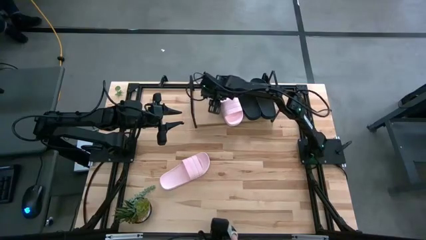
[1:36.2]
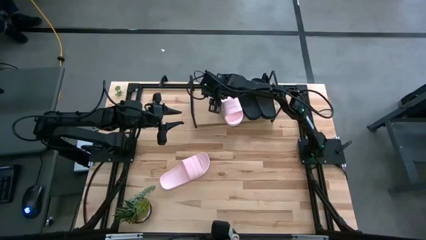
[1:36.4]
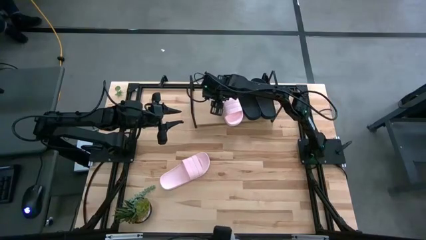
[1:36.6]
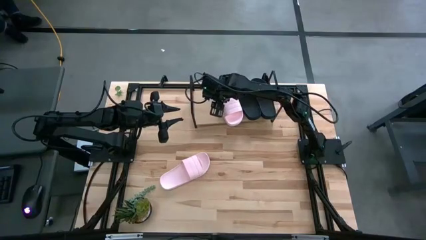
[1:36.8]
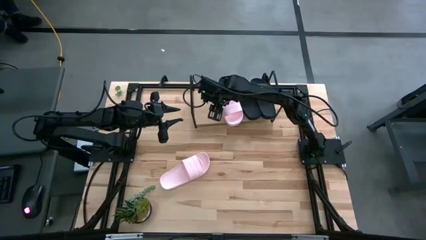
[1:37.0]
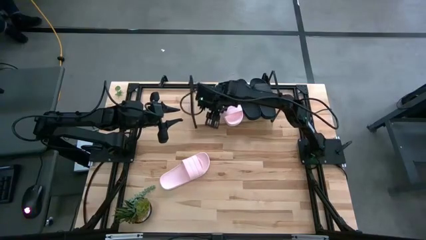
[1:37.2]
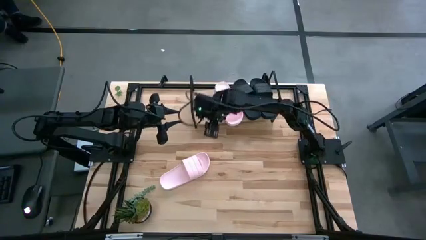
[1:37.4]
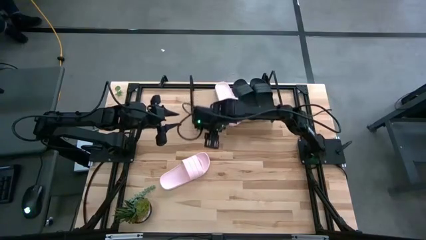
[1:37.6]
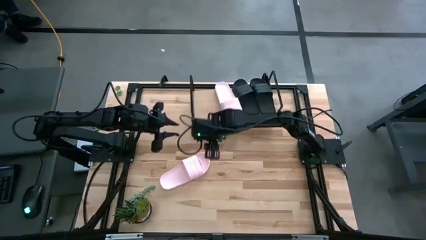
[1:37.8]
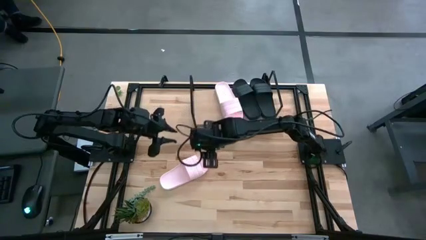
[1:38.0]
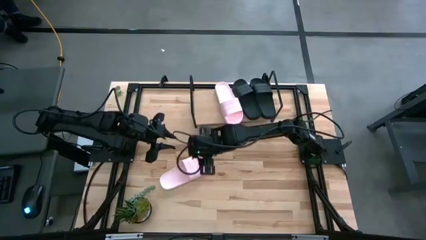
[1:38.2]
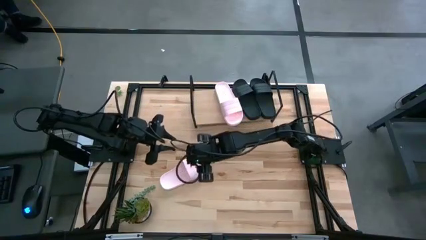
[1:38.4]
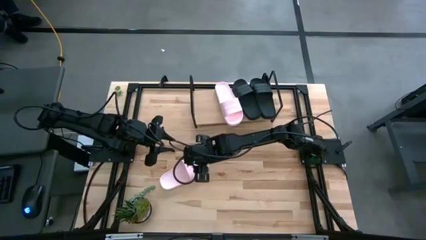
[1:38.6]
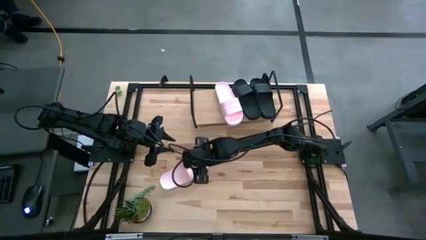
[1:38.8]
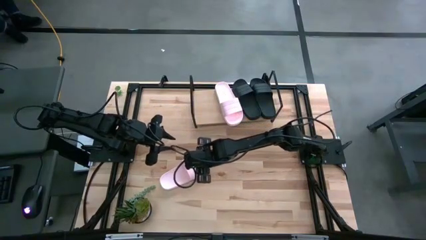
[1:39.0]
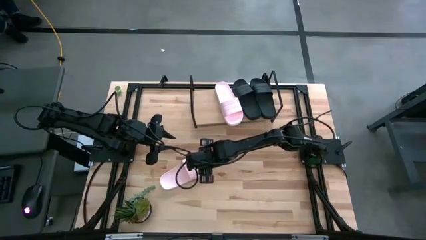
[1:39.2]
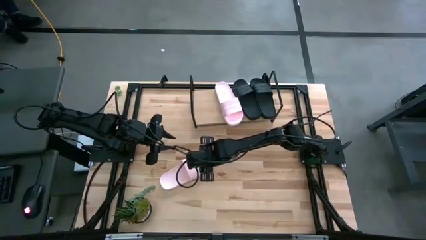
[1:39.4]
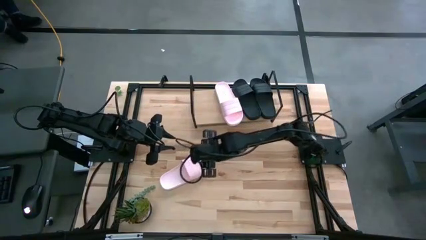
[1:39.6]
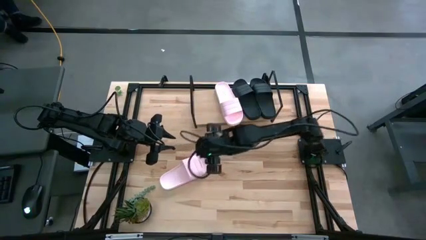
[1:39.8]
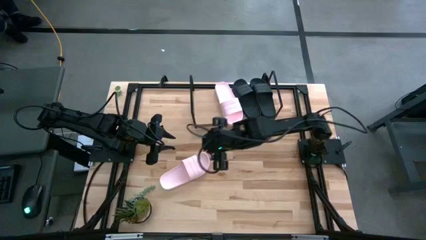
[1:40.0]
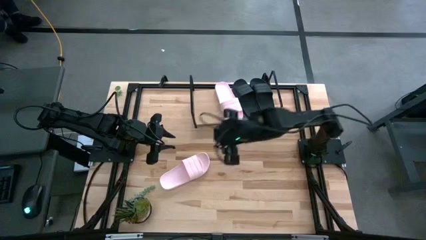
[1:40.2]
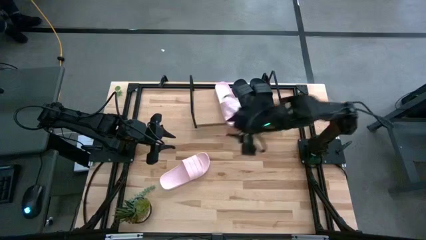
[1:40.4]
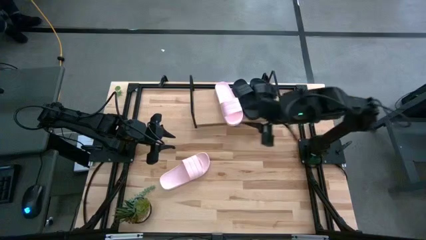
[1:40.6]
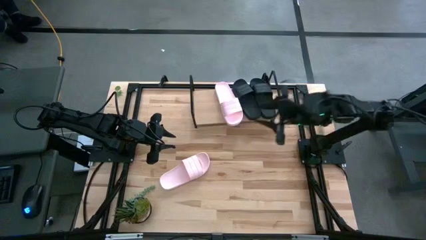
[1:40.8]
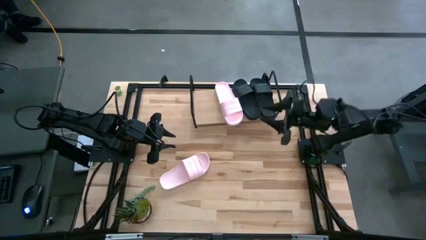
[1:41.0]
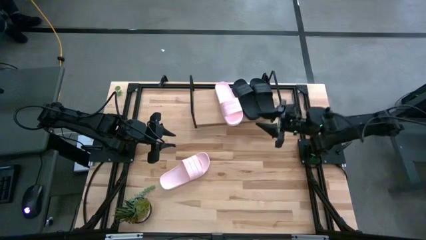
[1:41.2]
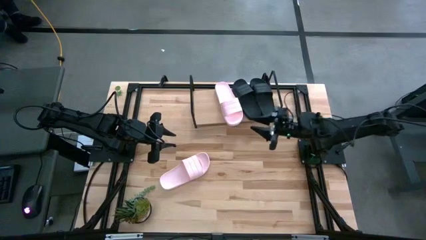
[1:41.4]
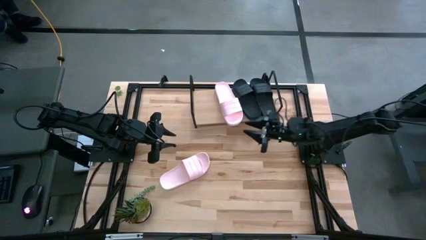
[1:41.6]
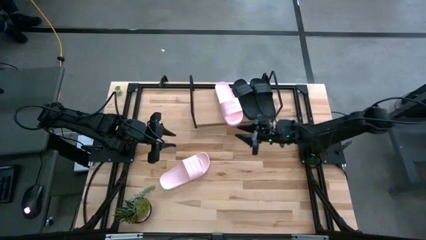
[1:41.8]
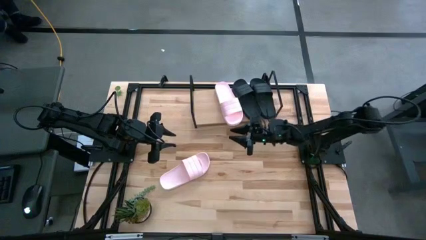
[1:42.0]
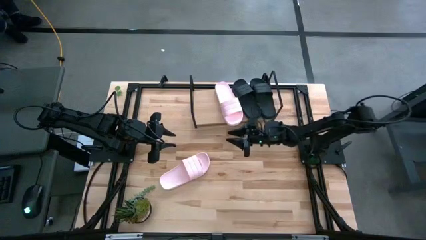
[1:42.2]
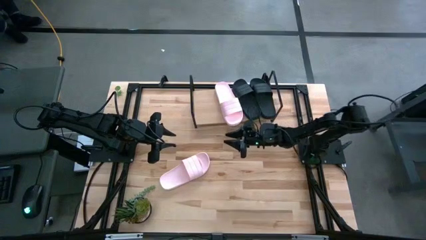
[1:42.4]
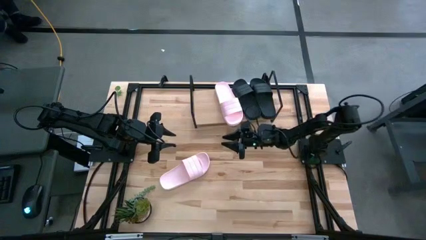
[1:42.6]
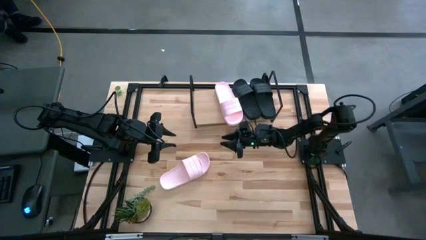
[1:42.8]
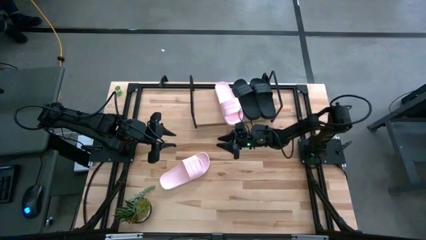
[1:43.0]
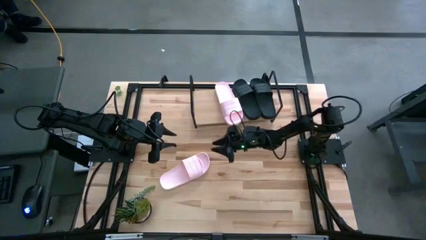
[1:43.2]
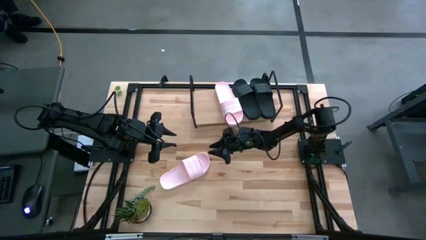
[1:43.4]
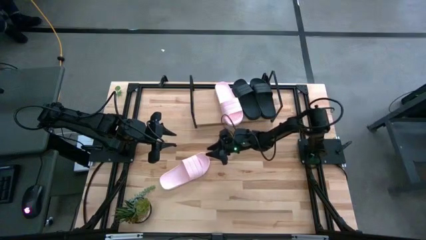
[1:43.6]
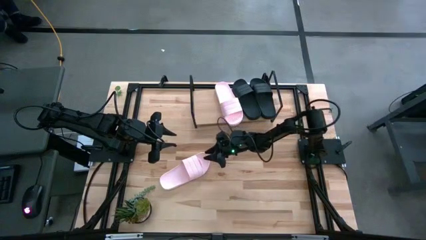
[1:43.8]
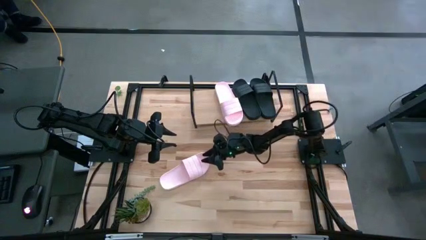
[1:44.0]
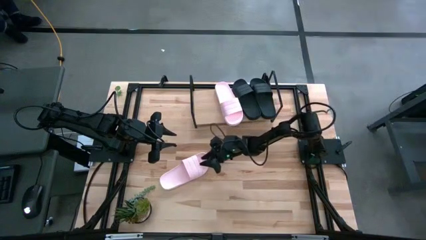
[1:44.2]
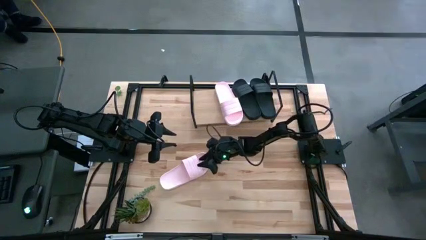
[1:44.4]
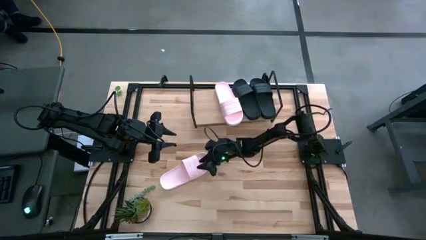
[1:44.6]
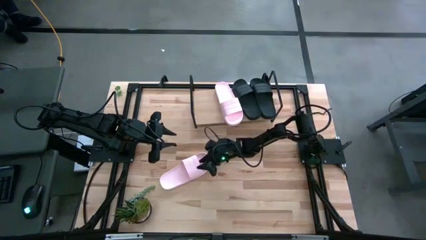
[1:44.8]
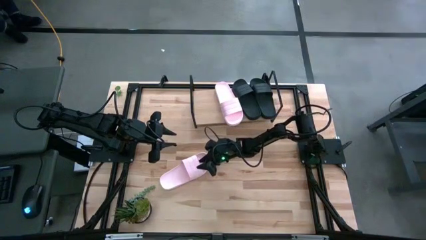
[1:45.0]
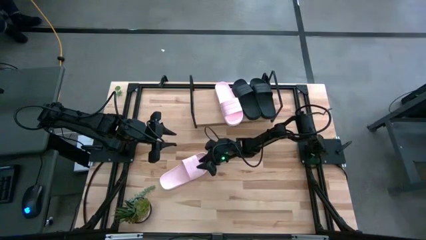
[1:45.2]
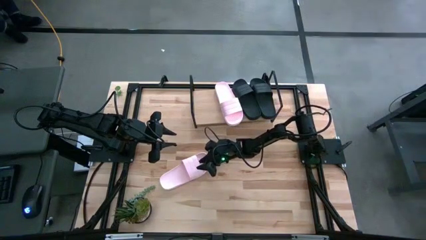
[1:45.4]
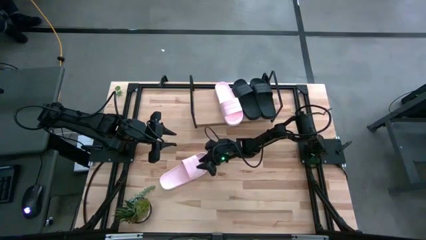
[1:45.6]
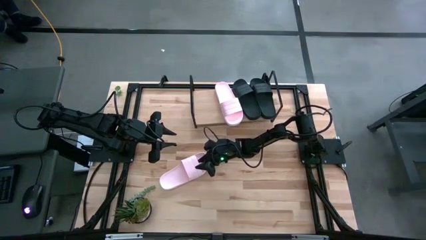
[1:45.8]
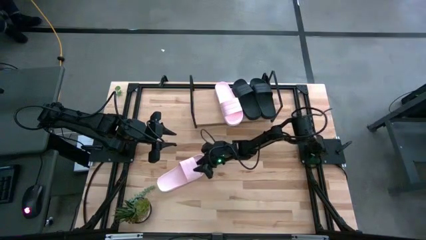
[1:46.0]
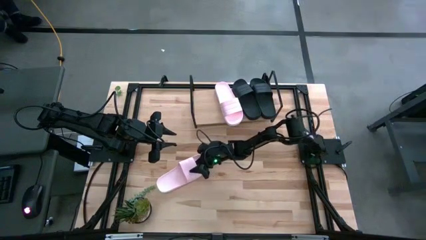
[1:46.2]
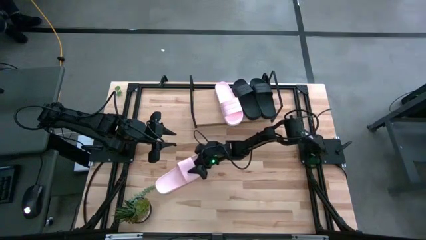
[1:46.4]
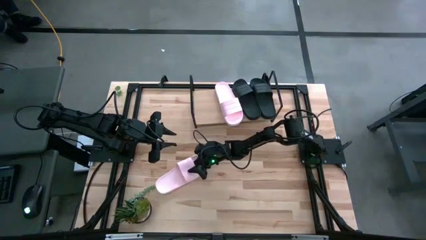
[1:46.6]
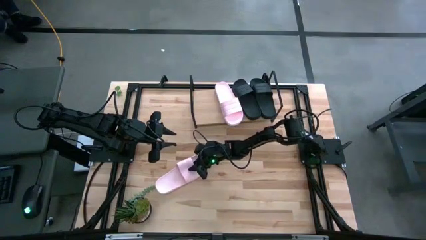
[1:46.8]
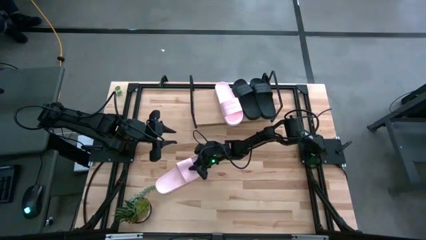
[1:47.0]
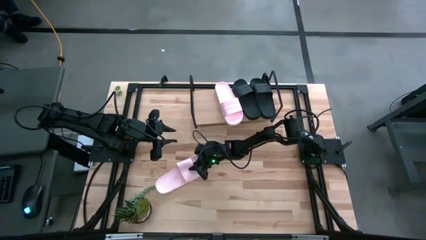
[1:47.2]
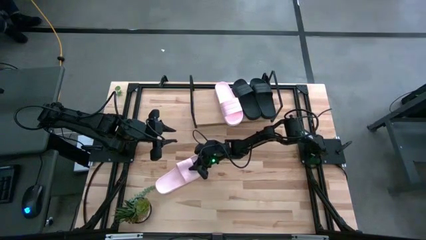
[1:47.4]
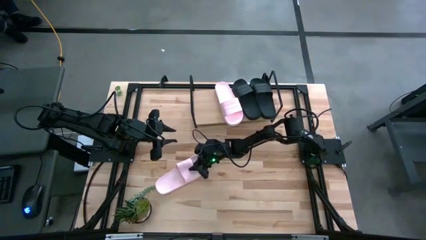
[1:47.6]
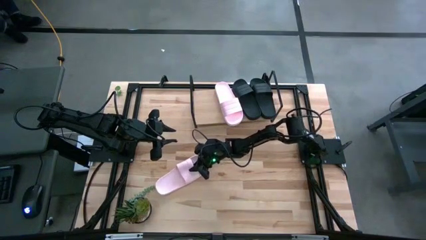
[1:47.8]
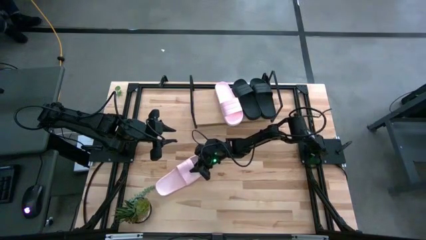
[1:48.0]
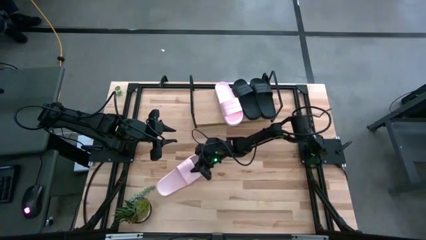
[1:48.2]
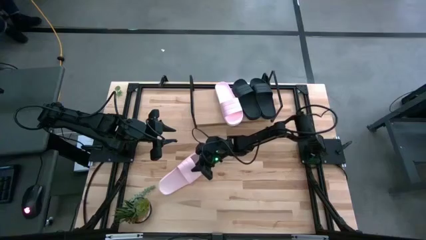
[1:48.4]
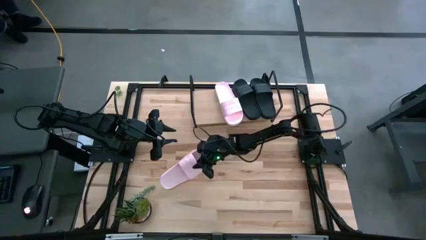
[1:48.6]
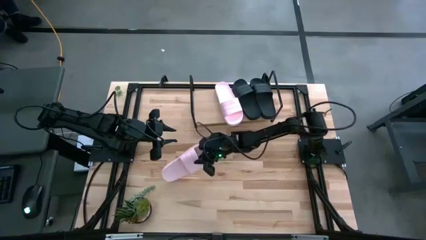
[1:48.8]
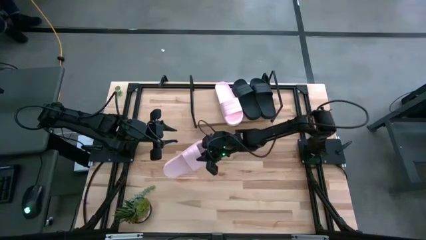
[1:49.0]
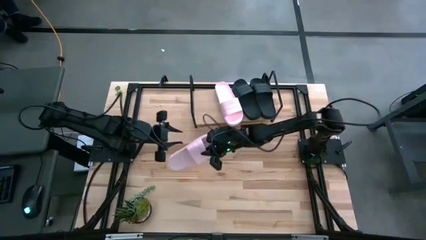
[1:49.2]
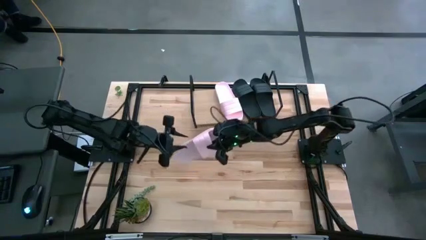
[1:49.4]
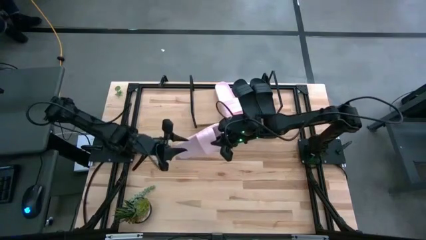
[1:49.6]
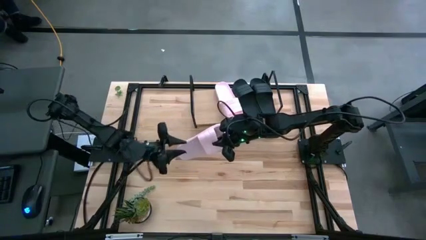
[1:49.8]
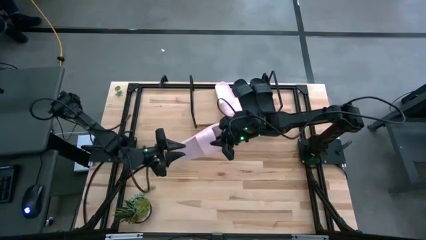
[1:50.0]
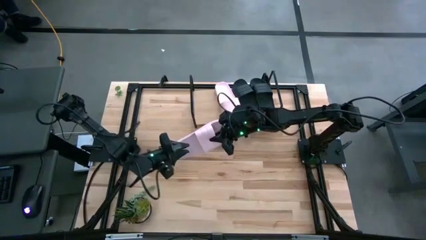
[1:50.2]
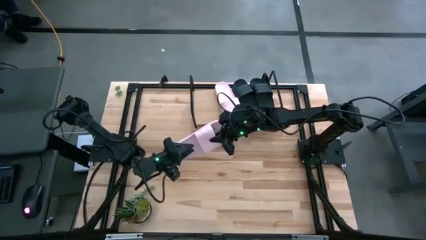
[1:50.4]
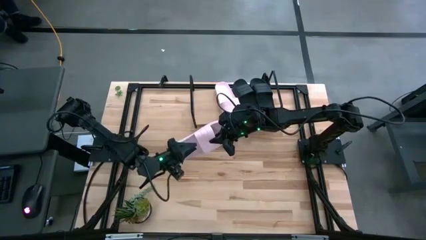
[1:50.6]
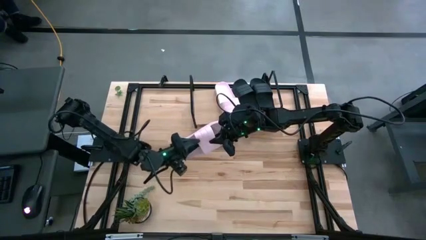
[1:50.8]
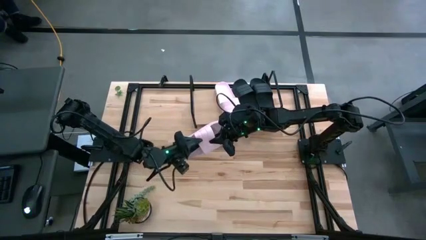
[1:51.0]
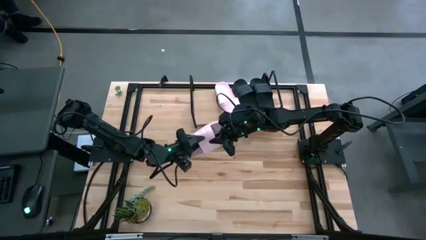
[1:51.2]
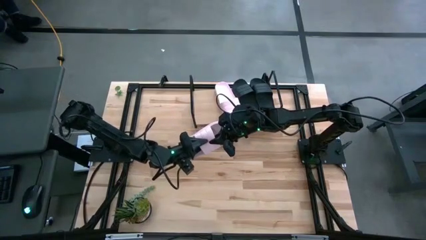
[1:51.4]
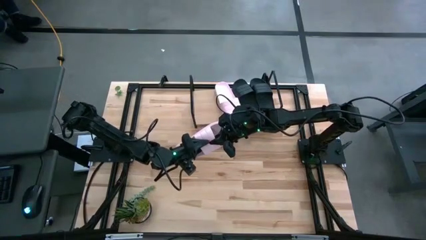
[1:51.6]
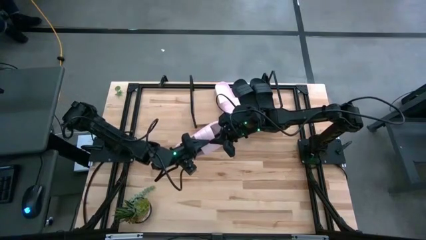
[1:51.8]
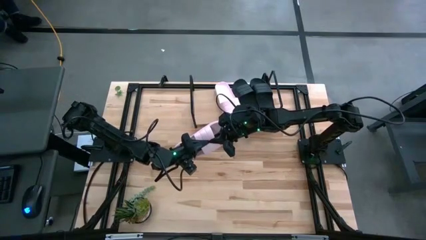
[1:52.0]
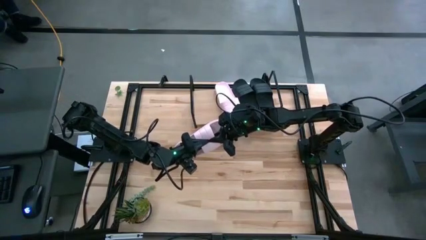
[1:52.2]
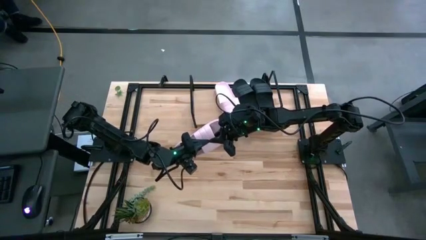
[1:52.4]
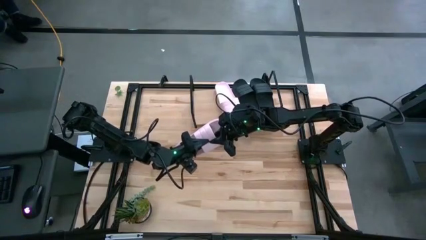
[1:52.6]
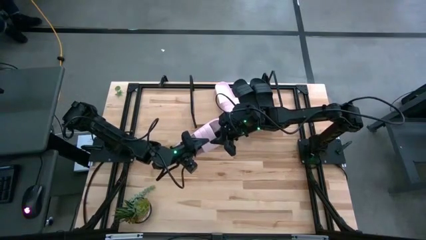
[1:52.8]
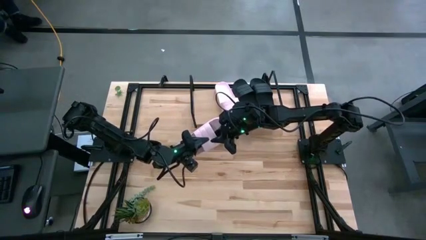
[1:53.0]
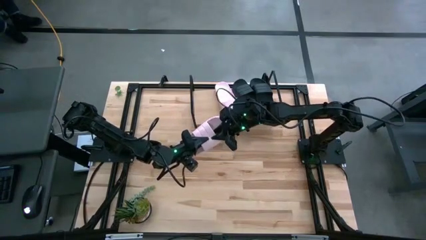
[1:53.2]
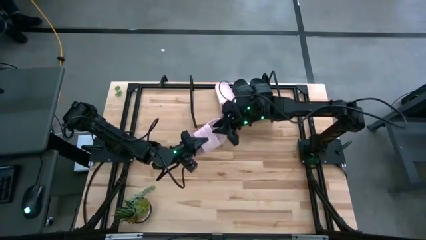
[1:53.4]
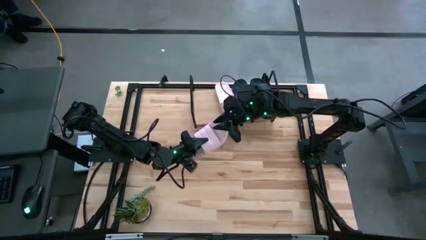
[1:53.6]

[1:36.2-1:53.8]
Task: Pick and place slides into the shelf
Put the pink slide on the shelf
